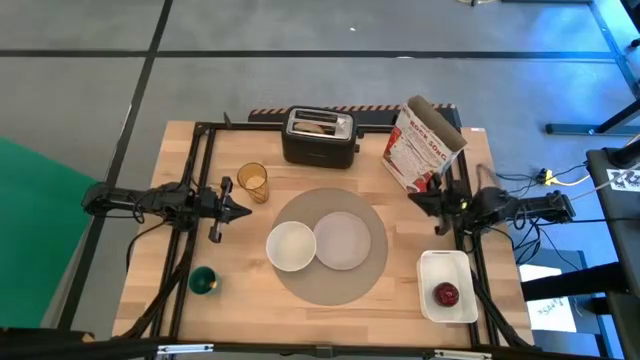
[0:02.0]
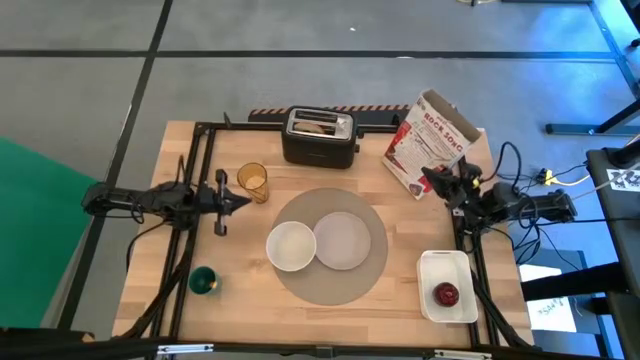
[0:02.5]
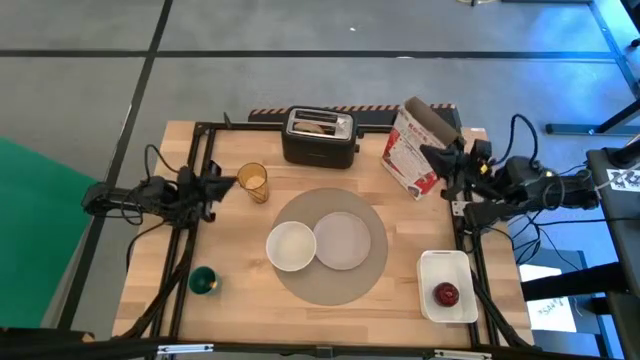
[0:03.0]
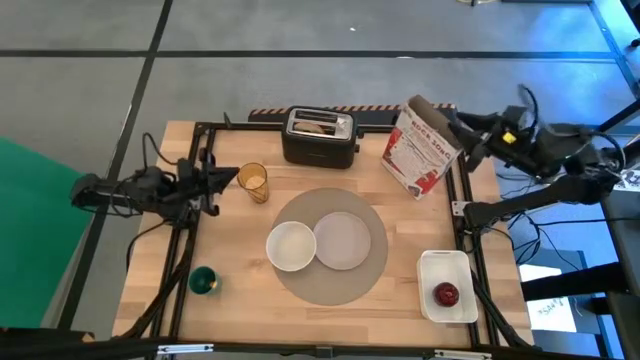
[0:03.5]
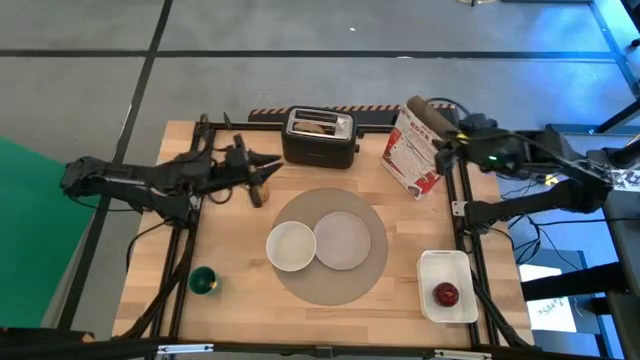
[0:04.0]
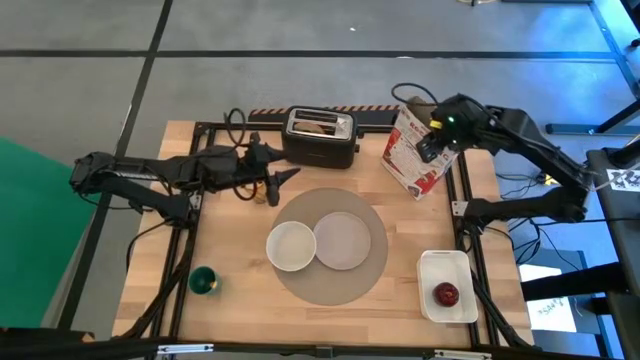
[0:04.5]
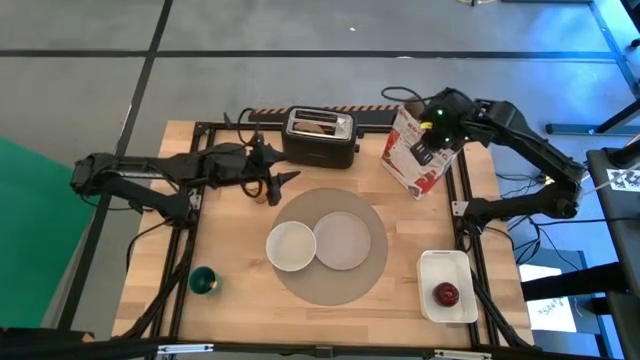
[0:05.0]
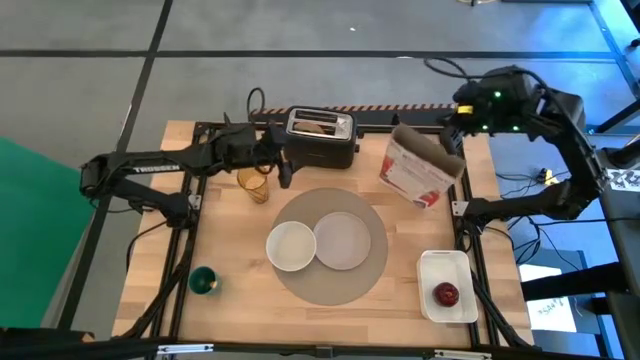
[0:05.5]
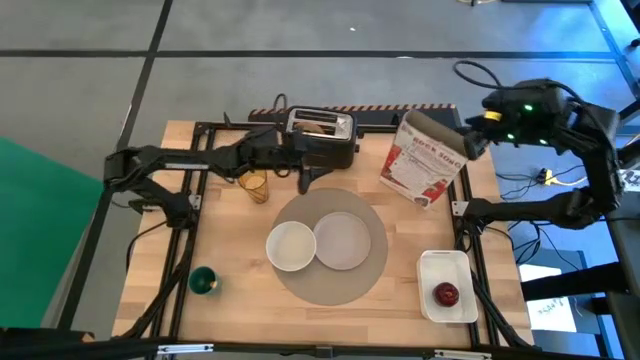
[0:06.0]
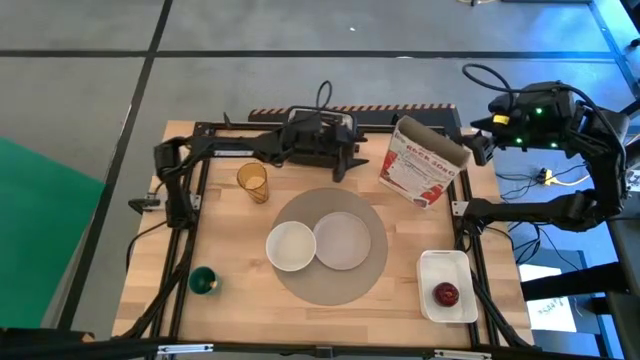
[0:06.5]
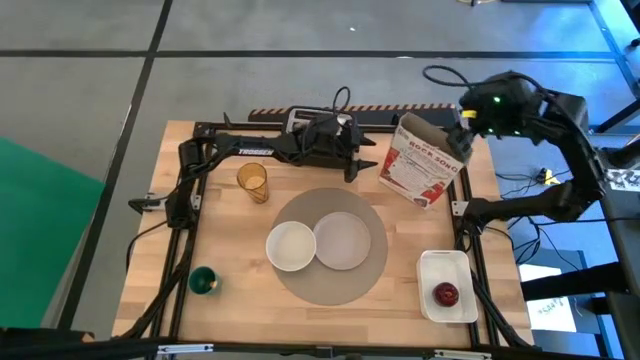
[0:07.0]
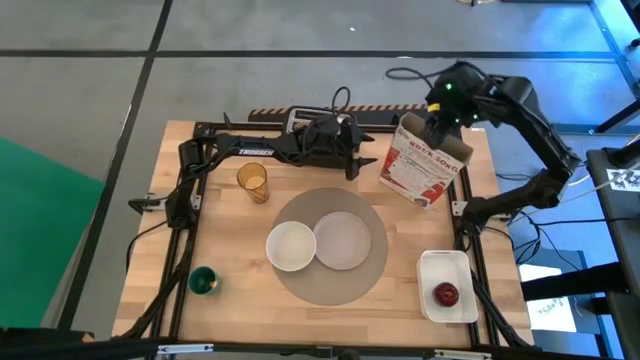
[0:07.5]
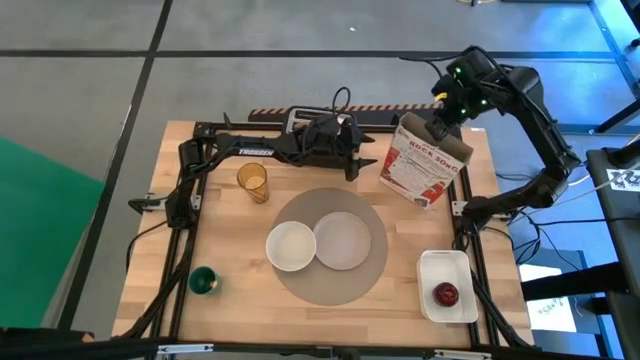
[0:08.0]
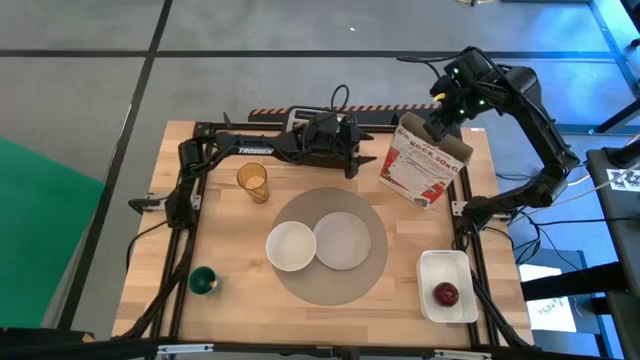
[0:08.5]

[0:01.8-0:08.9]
Task: Arrange a breakfast setting
Pour the cereal into the white bowl

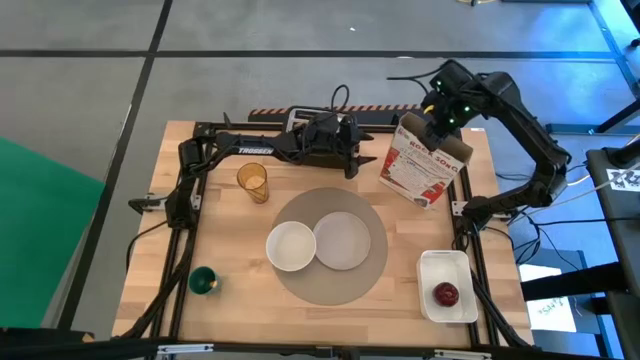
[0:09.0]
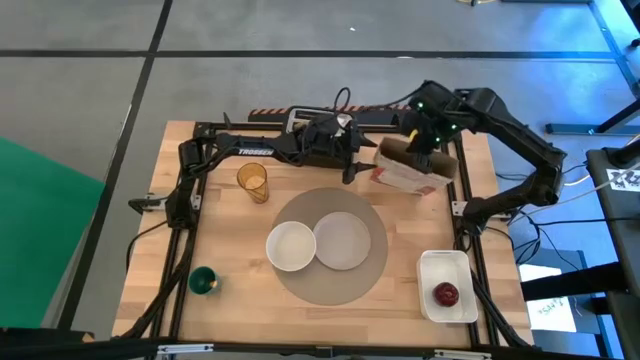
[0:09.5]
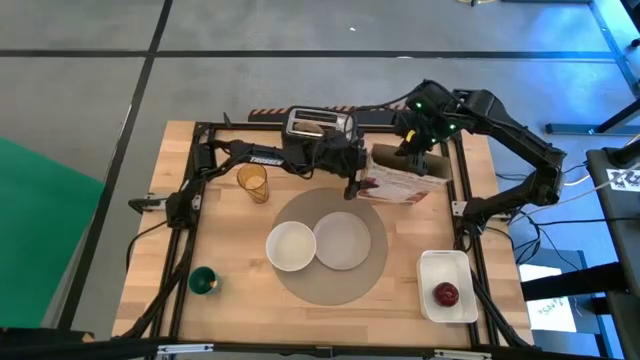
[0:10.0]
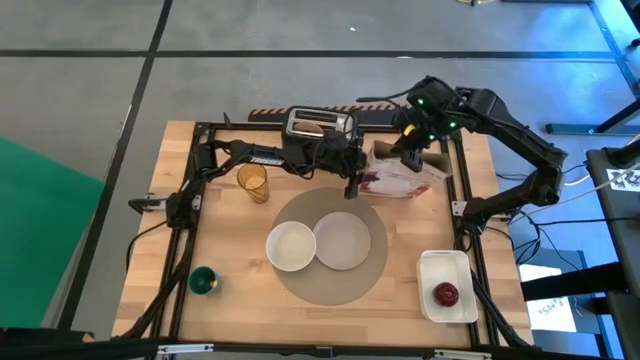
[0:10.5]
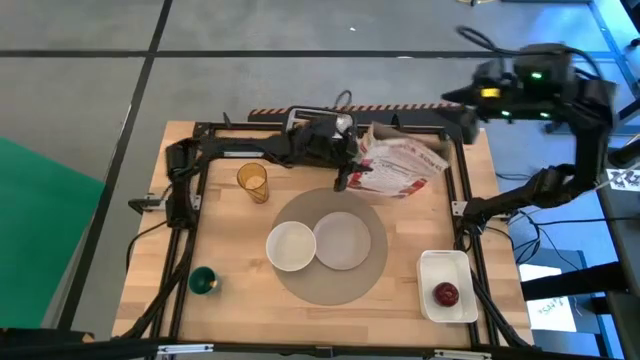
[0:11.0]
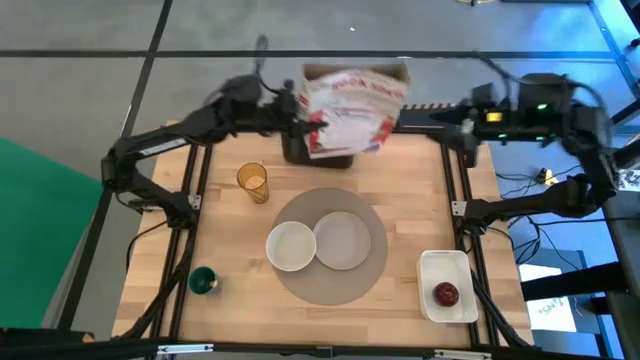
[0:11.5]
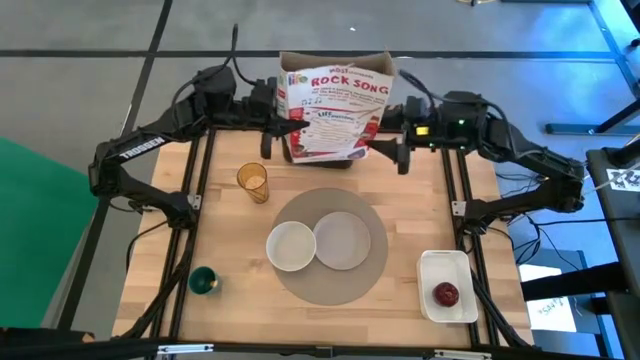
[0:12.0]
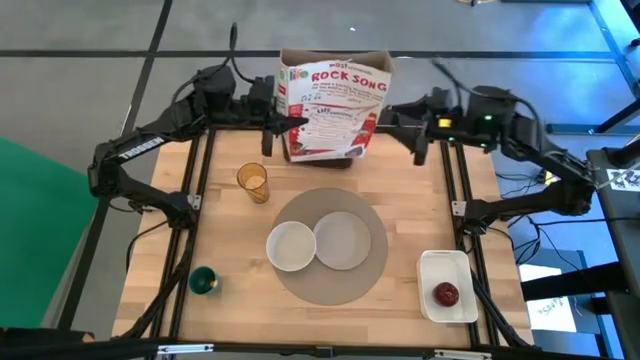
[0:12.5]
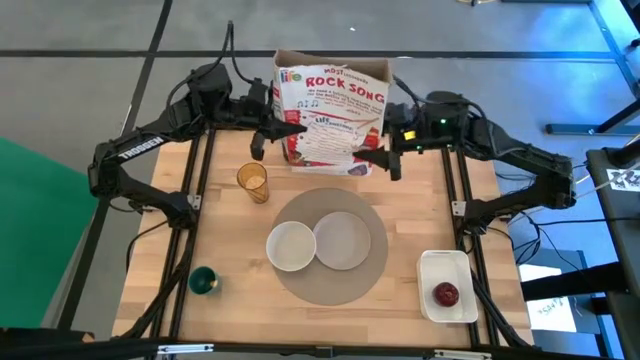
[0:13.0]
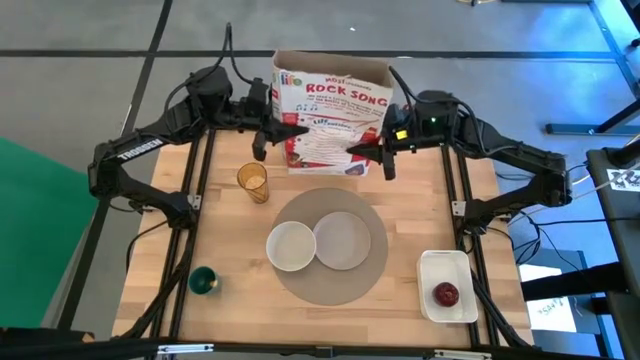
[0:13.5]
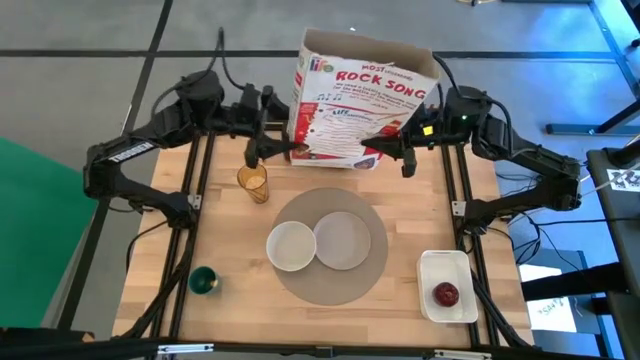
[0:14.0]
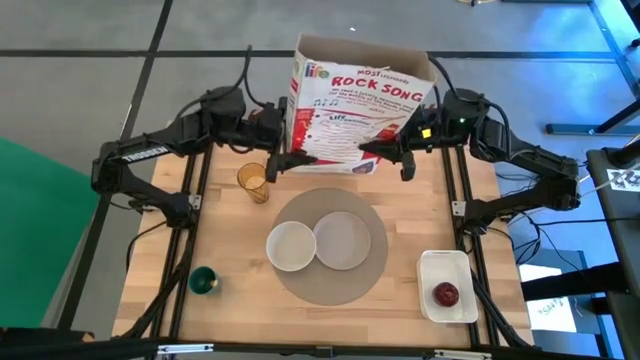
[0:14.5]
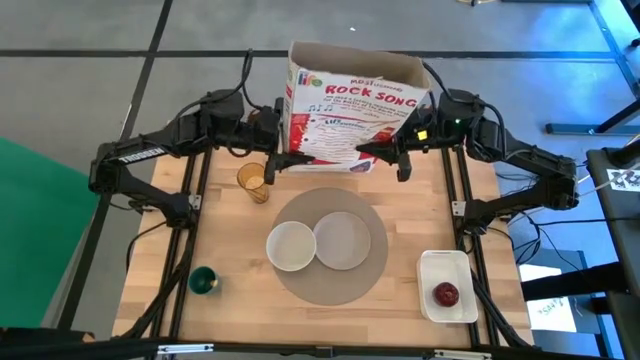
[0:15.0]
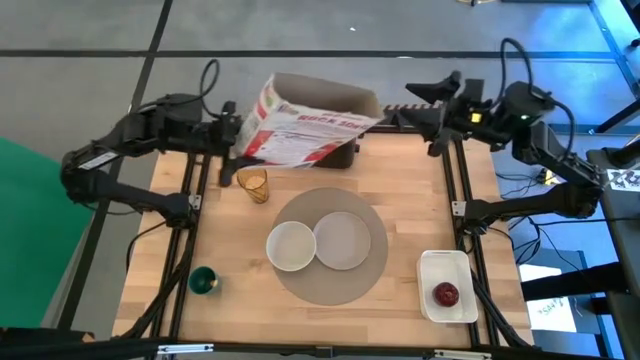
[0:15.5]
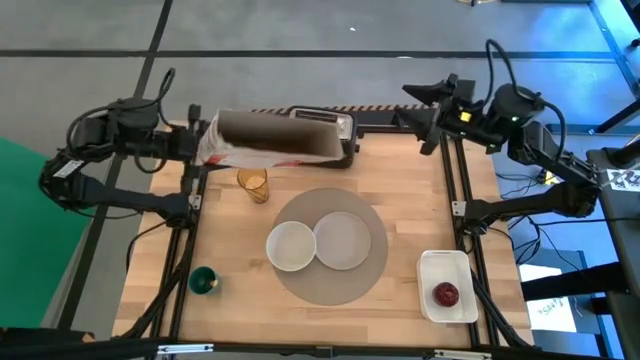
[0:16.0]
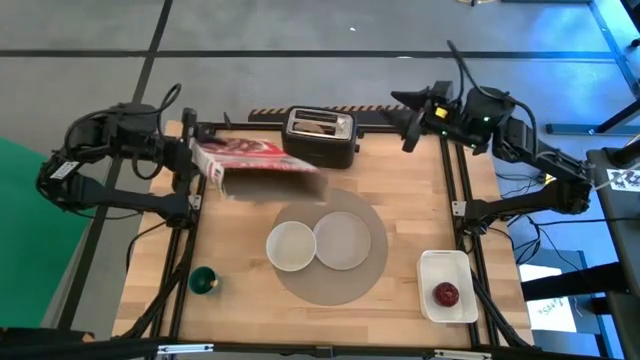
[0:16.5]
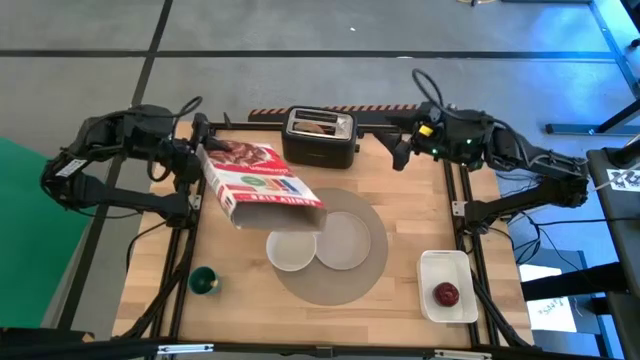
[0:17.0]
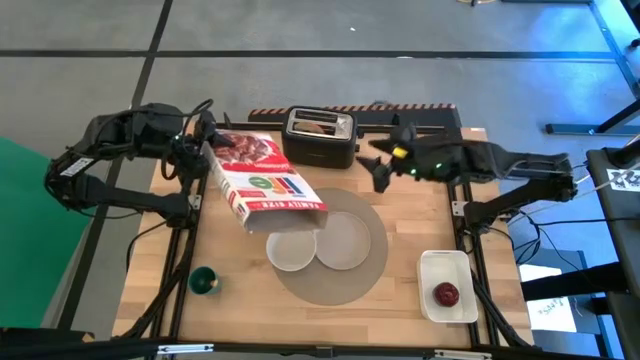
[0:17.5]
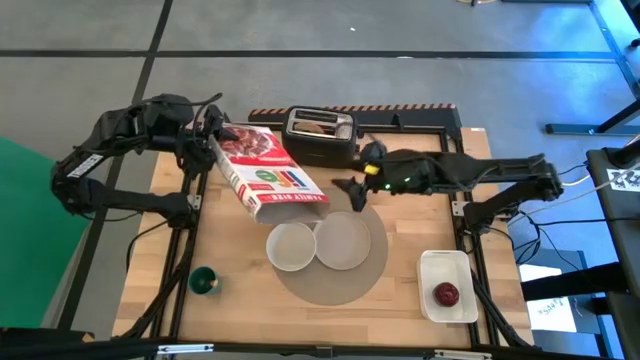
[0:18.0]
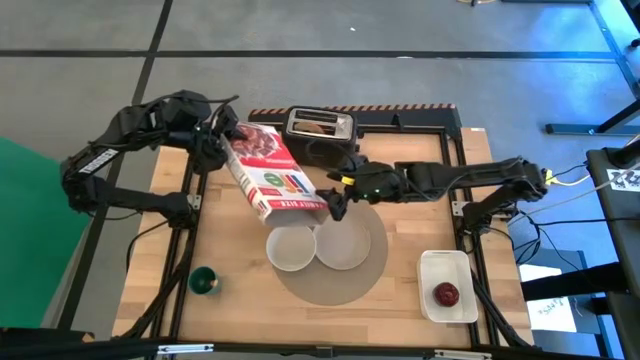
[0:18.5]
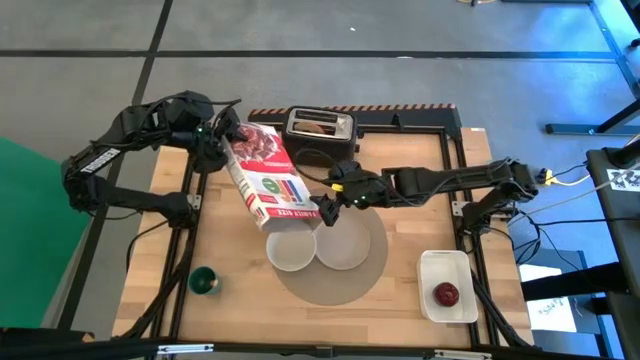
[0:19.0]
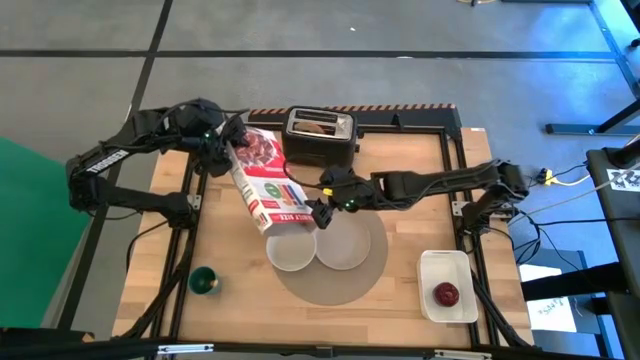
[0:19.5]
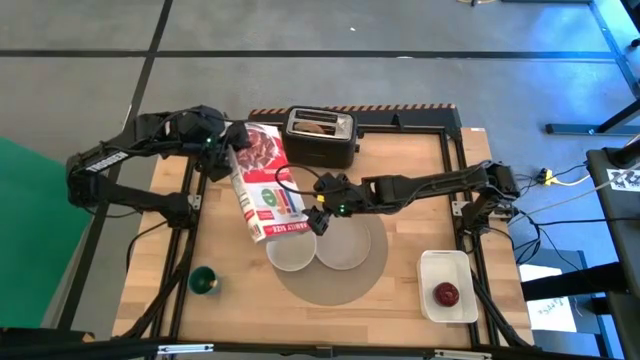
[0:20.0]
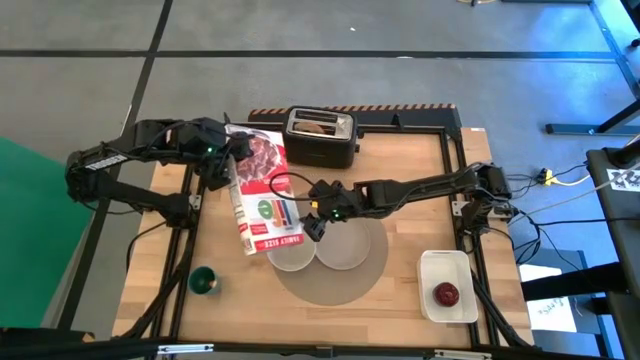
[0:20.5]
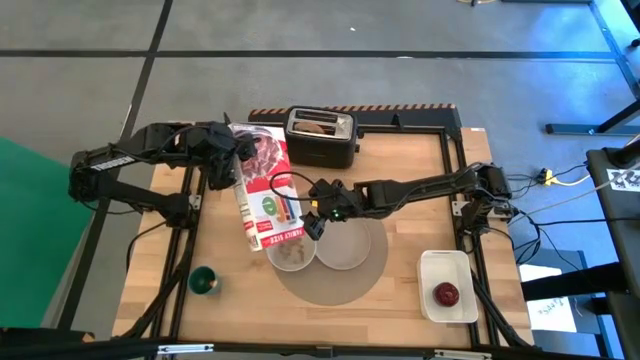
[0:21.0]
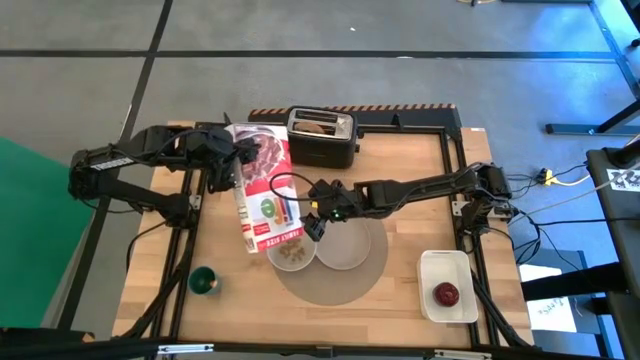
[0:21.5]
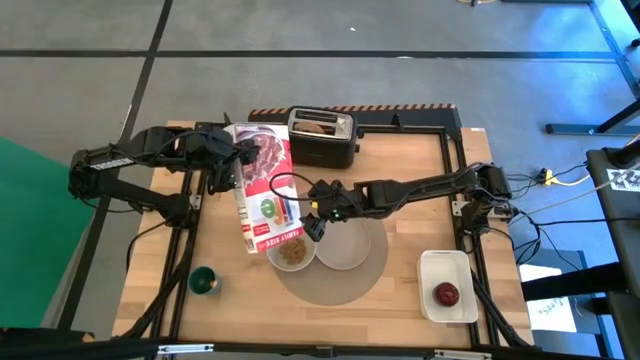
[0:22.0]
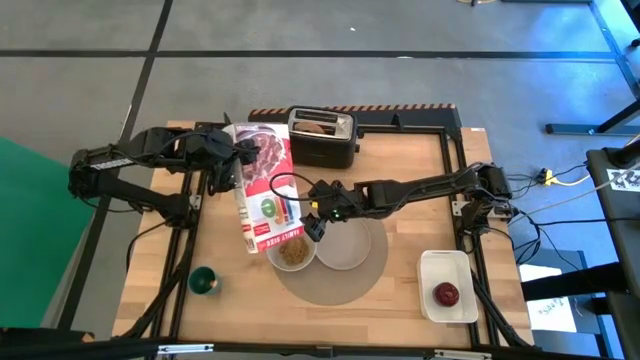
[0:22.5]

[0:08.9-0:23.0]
Pour the cereal into the white bowl
